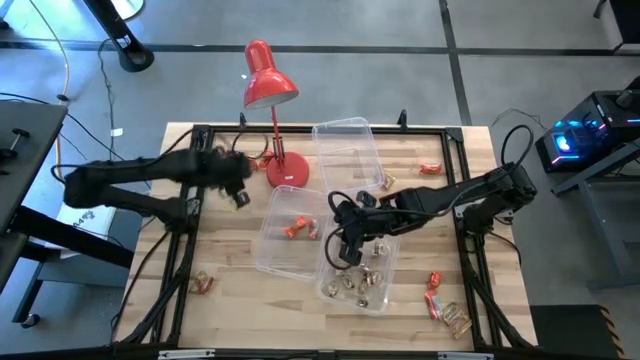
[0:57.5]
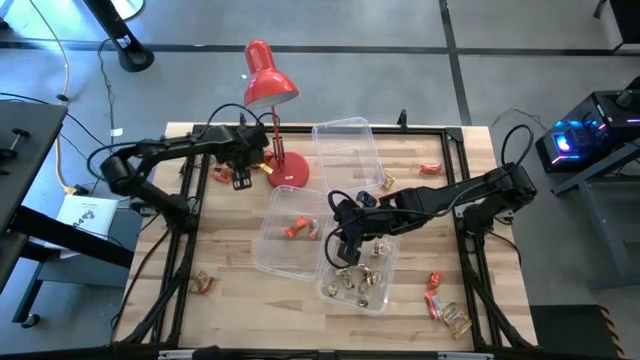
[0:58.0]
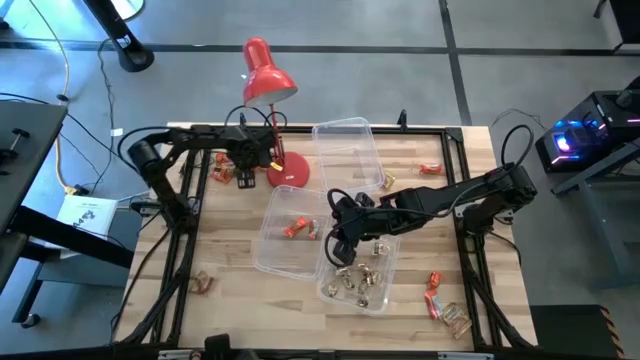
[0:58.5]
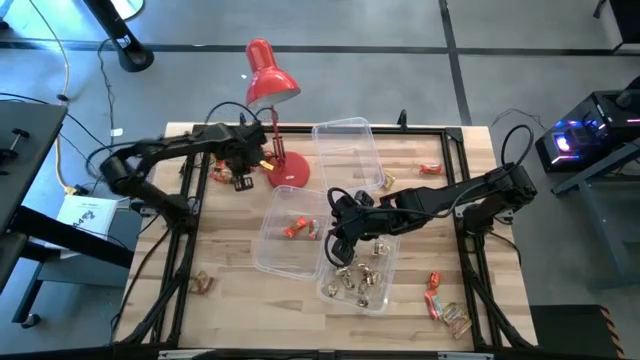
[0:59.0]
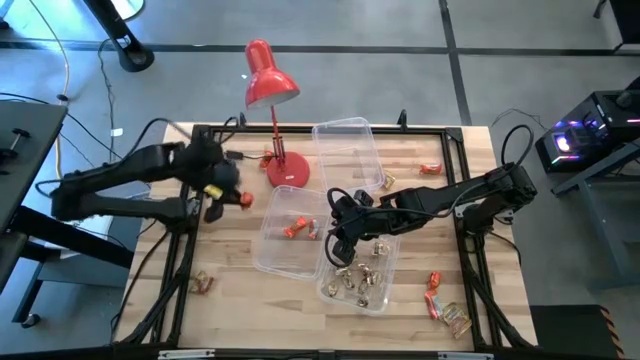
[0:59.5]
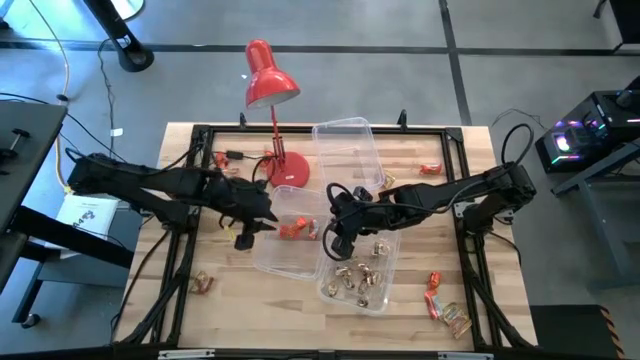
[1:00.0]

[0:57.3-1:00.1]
Task: Sort candy
Put the orange chocolate bar into the bottom left transparent bin

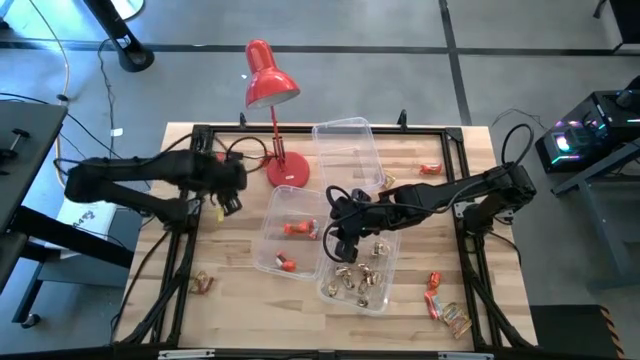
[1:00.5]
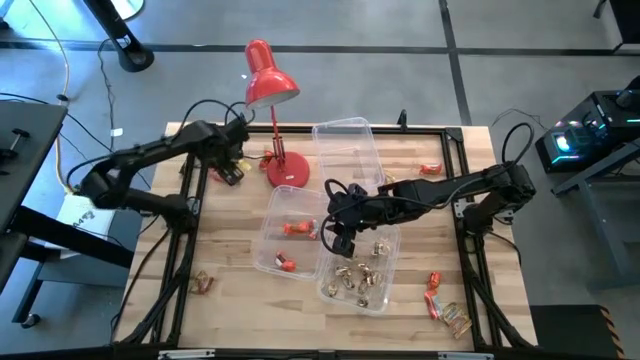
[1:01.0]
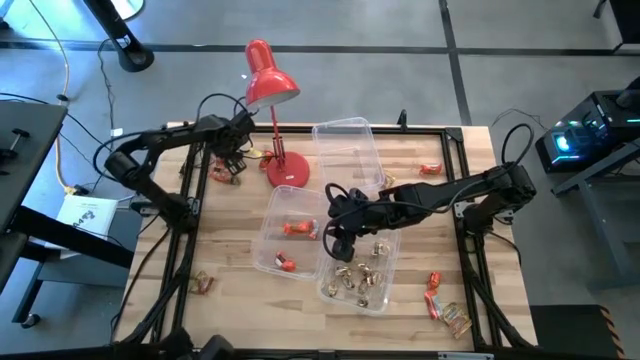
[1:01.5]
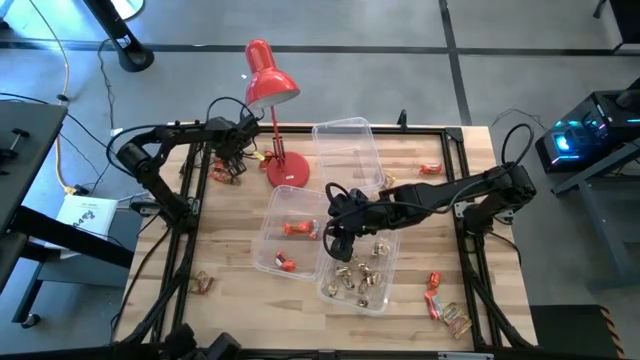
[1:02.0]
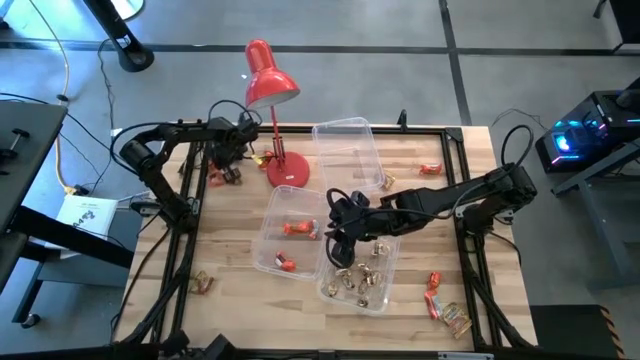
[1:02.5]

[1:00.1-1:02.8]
Put the orange chocolate bar into the bottom left transparent bin

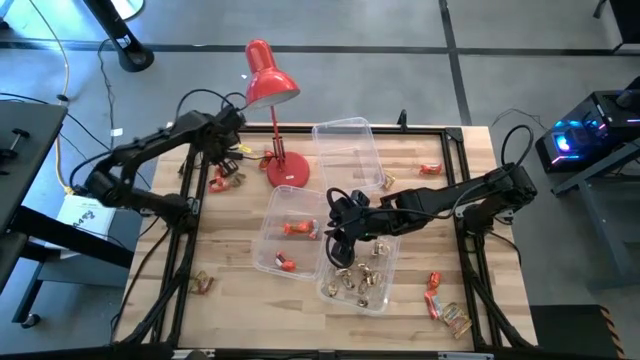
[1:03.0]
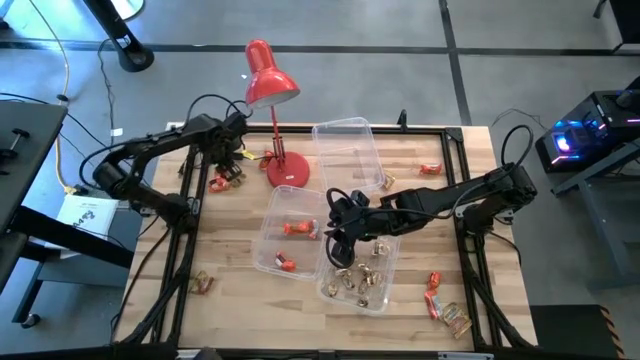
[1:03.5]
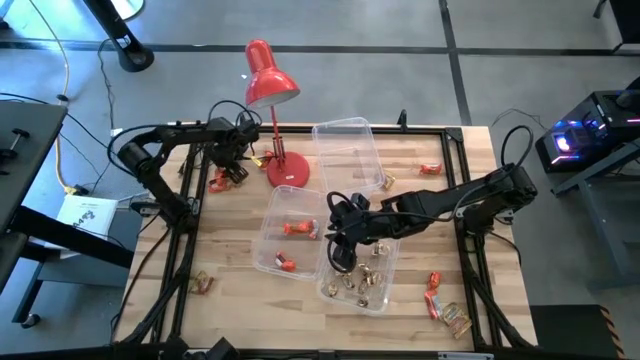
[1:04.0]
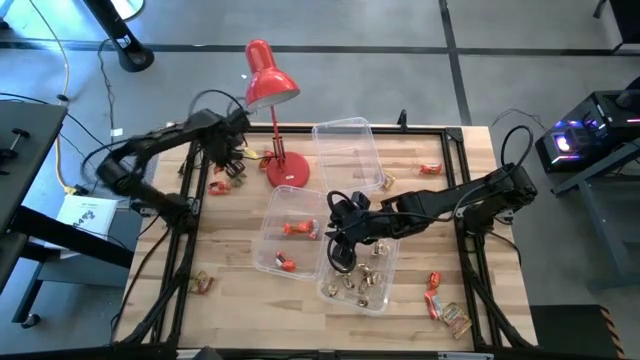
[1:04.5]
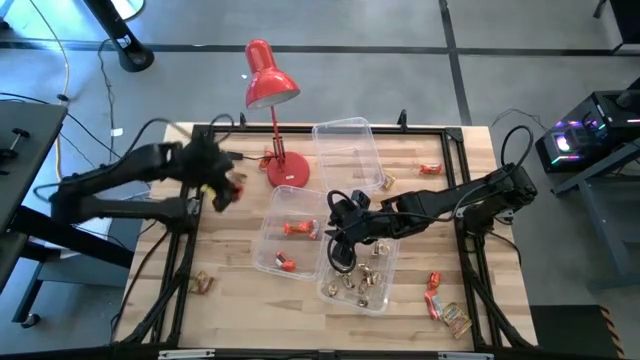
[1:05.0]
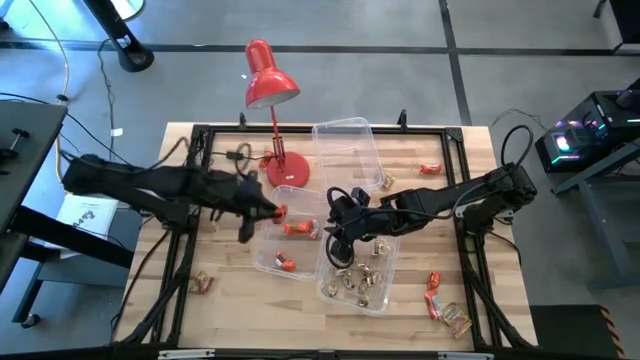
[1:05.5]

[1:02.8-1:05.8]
Put the orange chocolate bar into the bottom left transparent bin

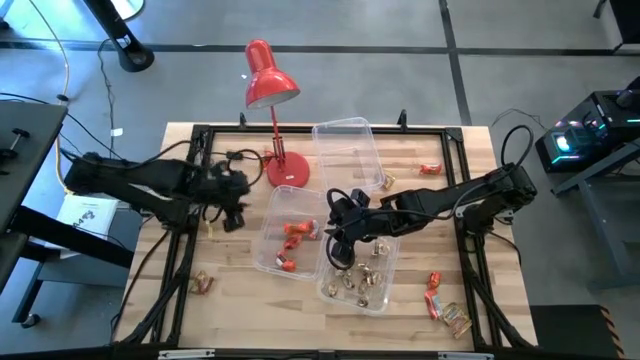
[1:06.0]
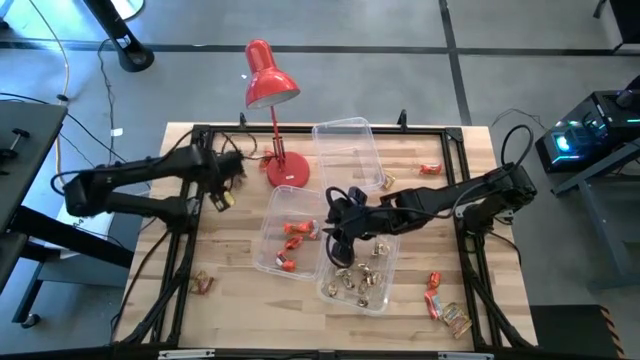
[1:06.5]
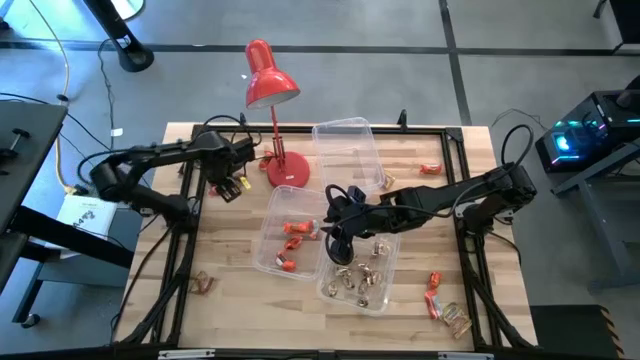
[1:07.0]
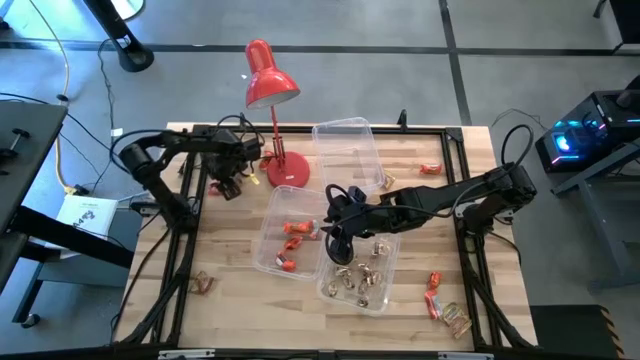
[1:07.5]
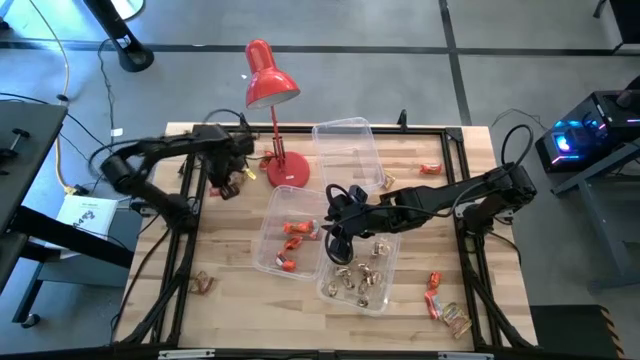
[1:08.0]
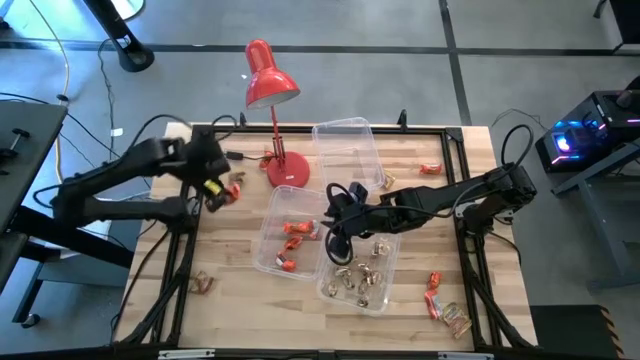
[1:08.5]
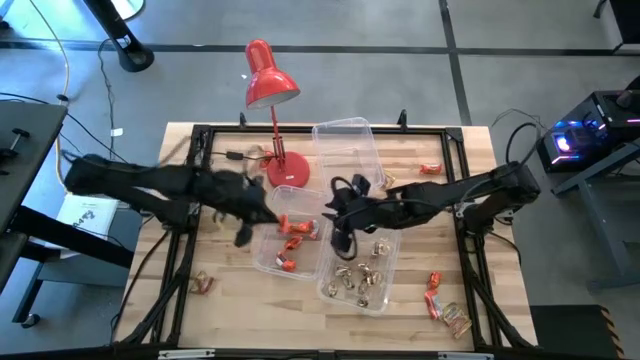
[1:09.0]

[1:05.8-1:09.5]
Put the orange chocolate bar into the bottom left transparent bin

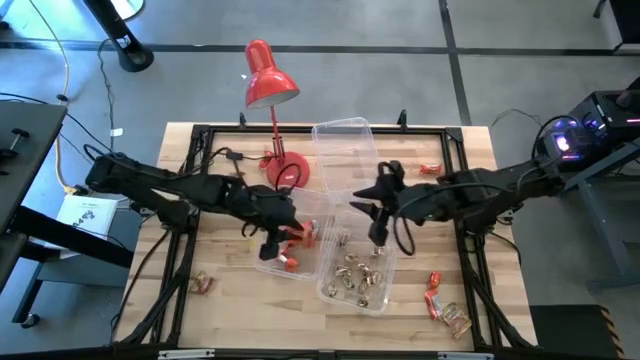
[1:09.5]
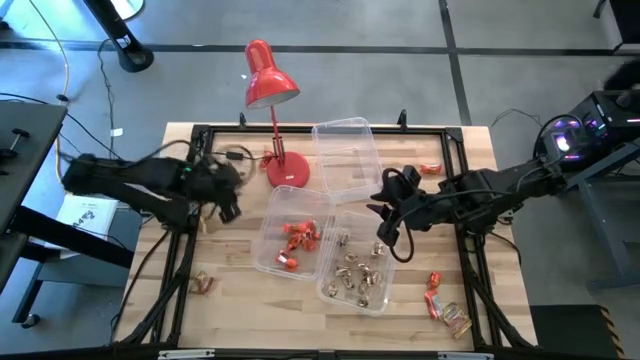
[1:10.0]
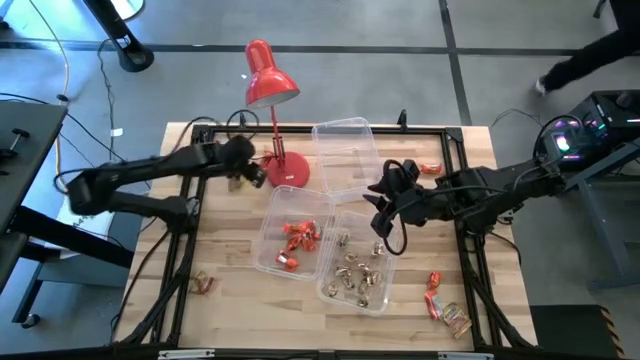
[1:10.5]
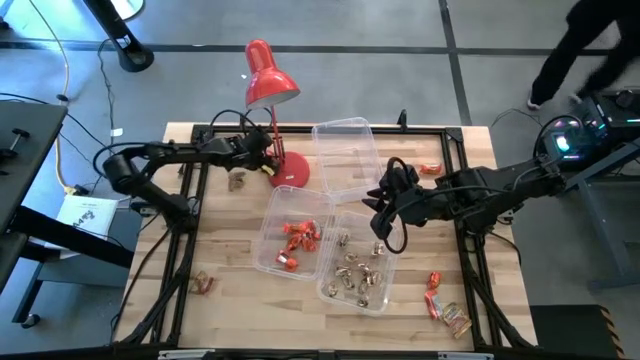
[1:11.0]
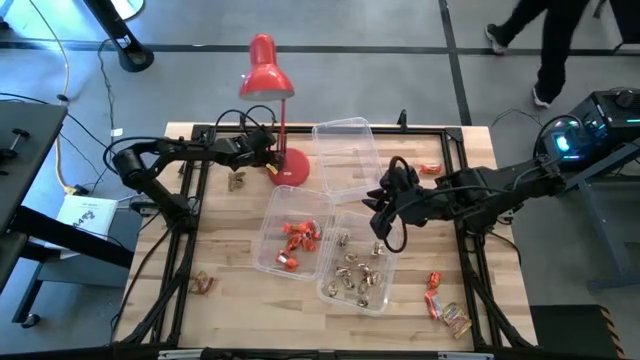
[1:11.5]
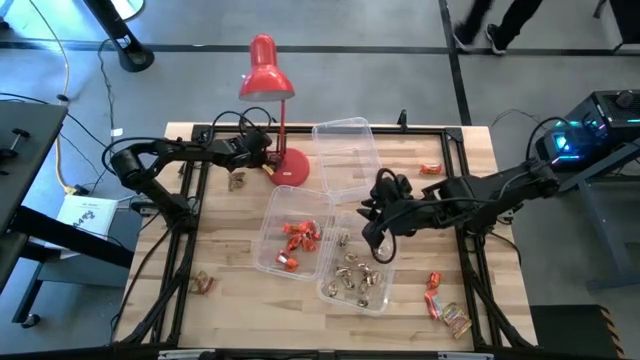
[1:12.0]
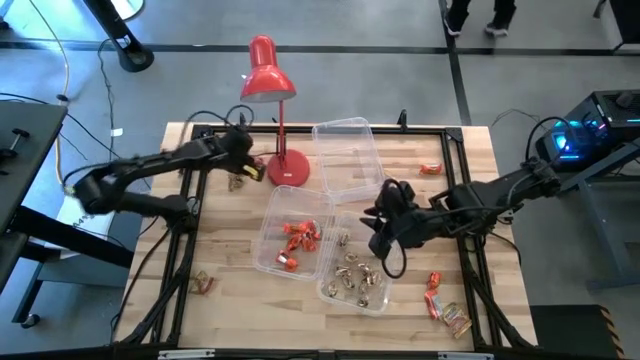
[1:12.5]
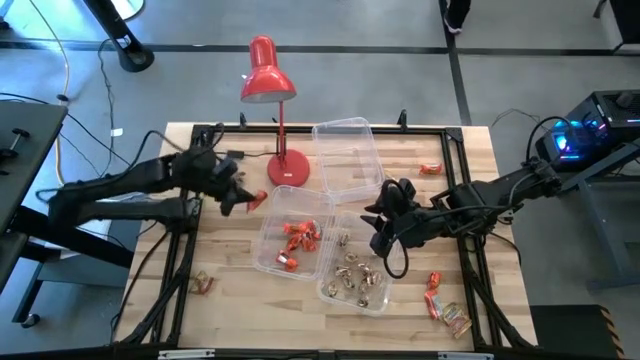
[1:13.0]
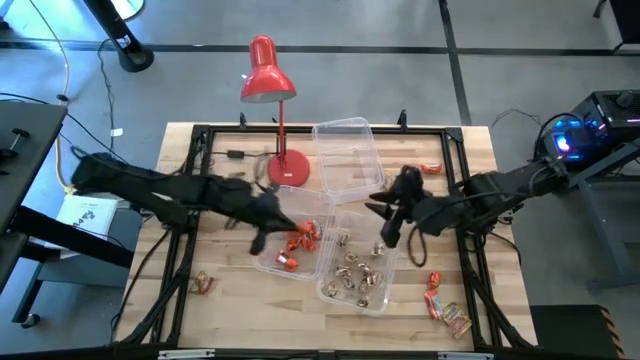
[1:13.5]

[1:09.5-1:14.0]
Put the orange chocolate bar into the bottom left transparent bin

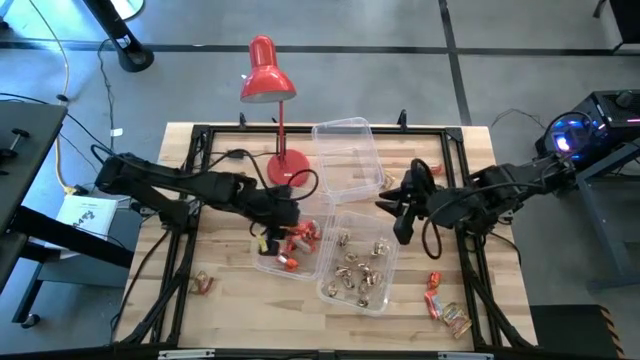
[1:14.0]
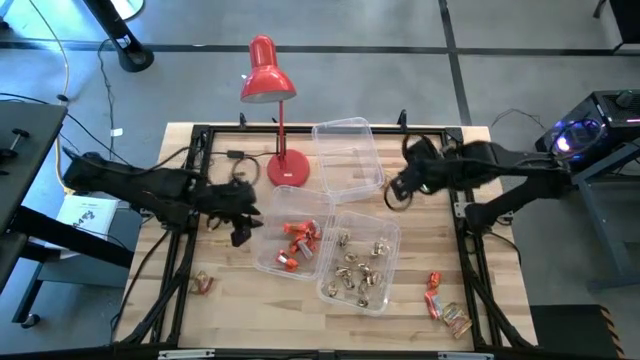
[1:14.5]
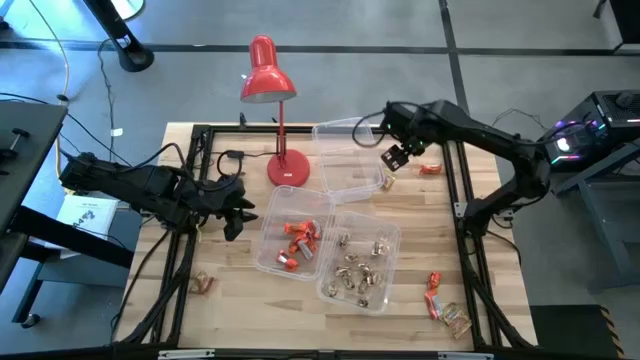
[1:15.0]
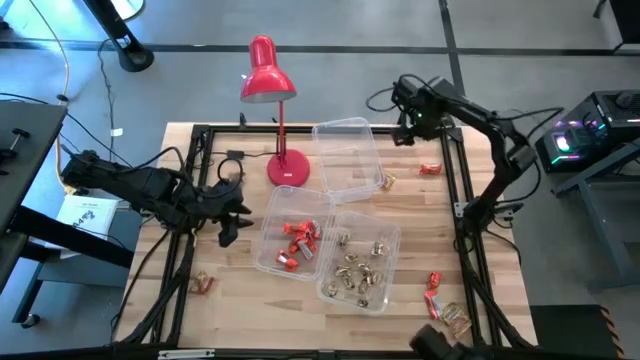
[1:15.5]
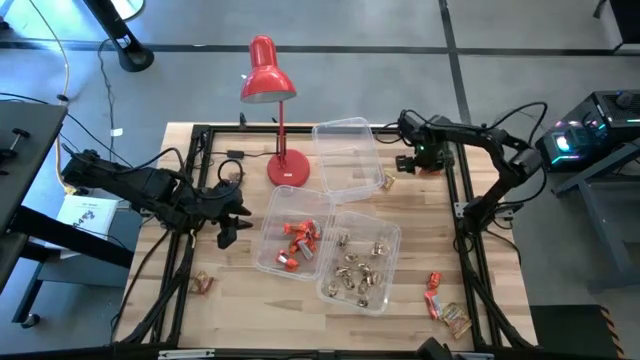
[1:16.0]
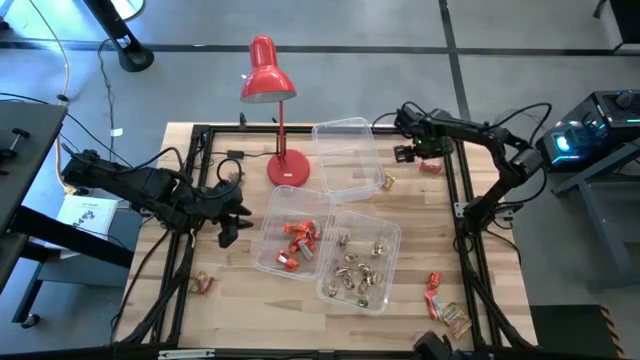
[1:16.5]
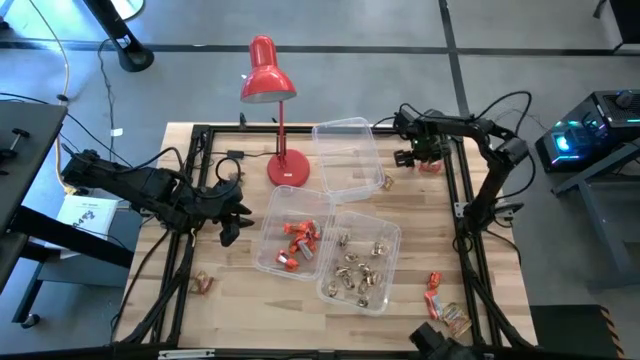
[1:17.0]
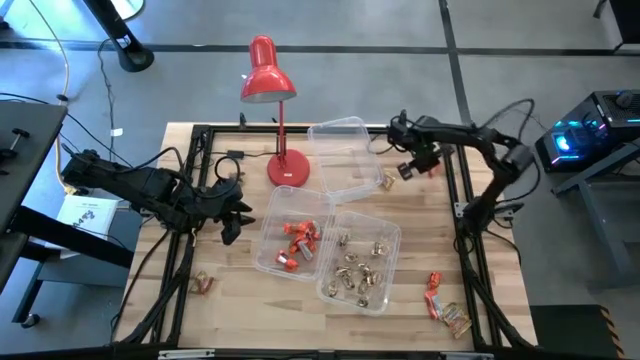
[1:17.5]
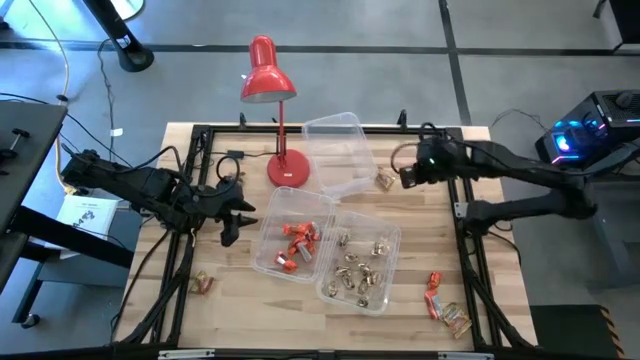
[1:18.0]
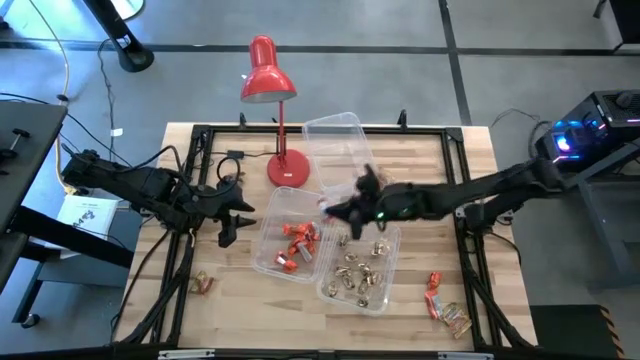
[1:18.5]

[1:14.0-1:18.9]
Put the orange chocolate bar into the bottom left transparent bin
